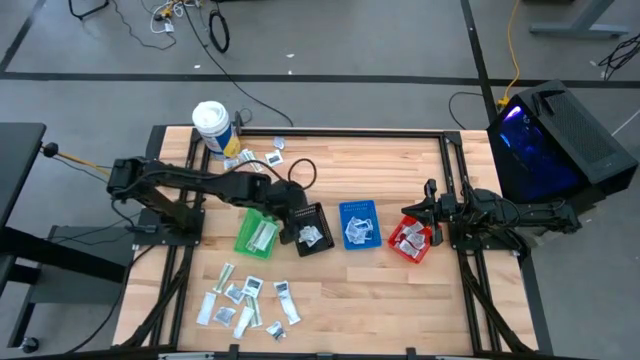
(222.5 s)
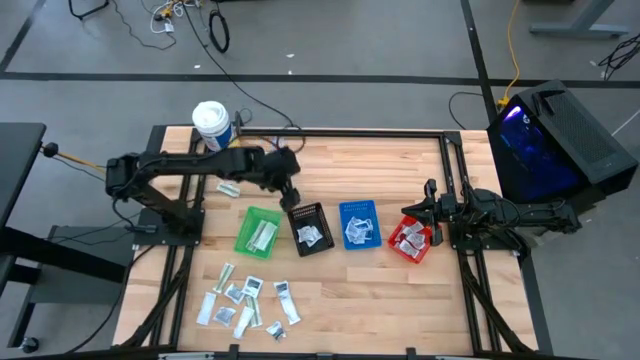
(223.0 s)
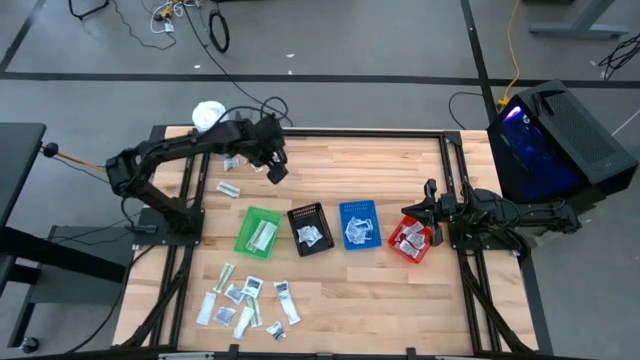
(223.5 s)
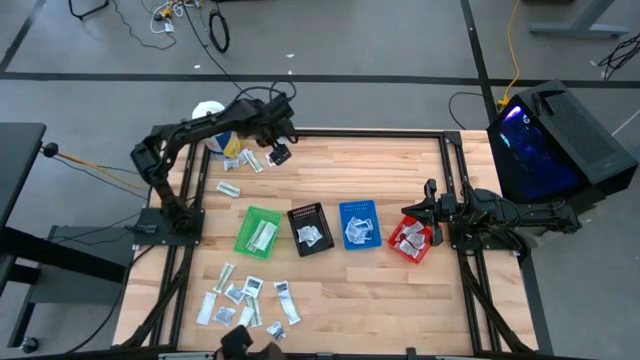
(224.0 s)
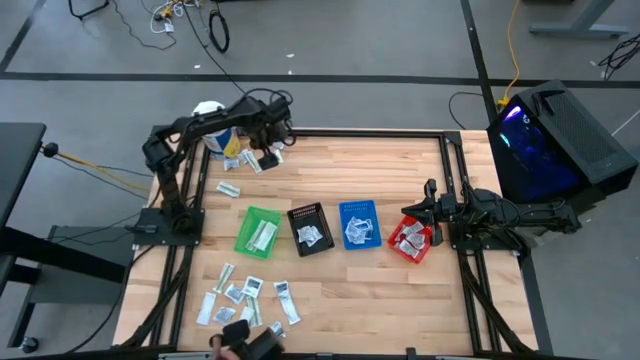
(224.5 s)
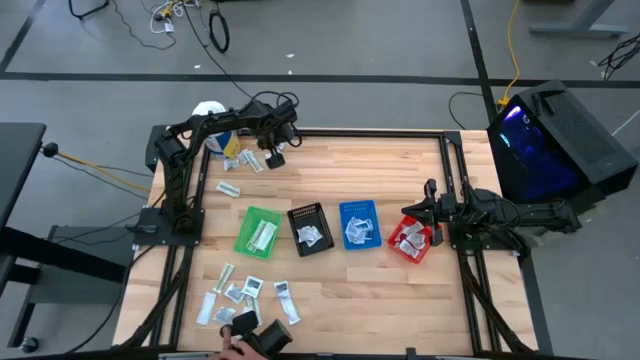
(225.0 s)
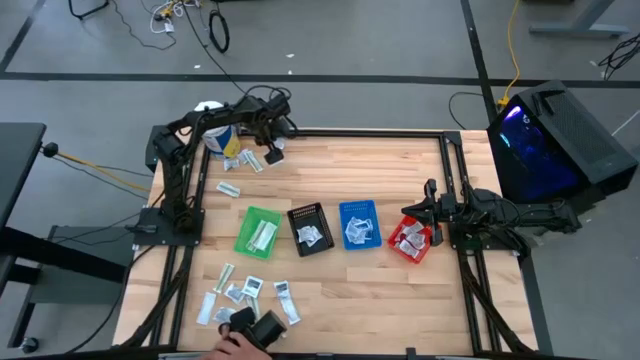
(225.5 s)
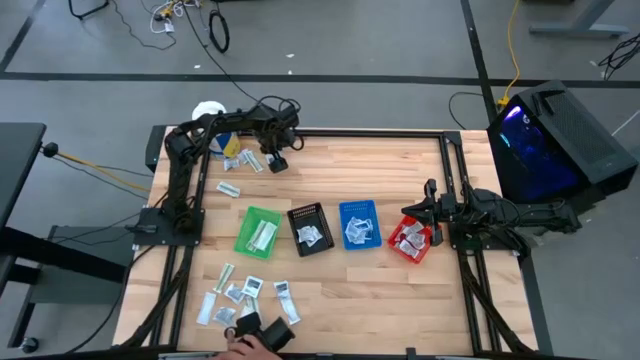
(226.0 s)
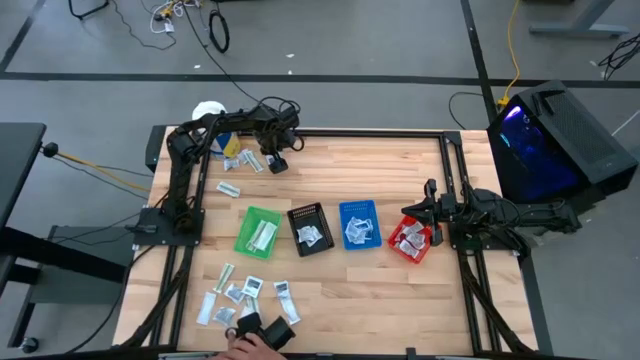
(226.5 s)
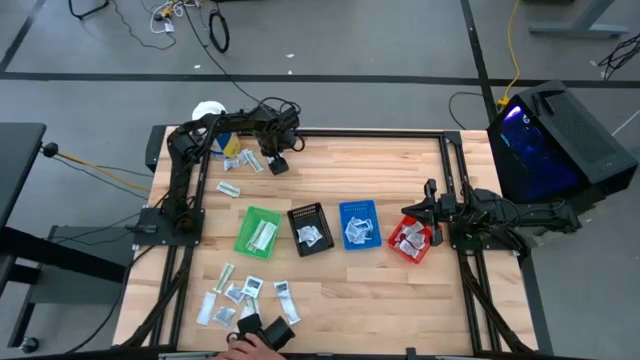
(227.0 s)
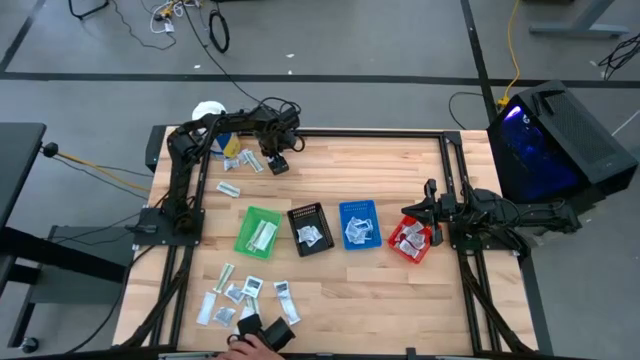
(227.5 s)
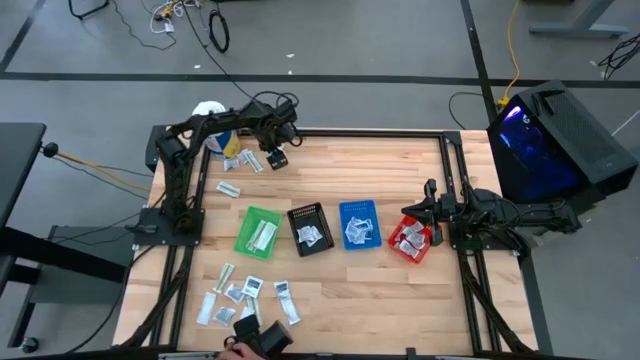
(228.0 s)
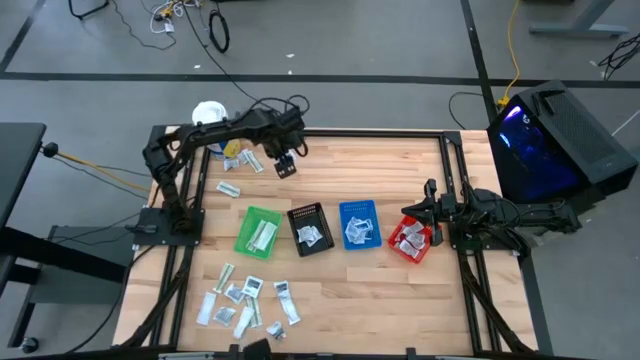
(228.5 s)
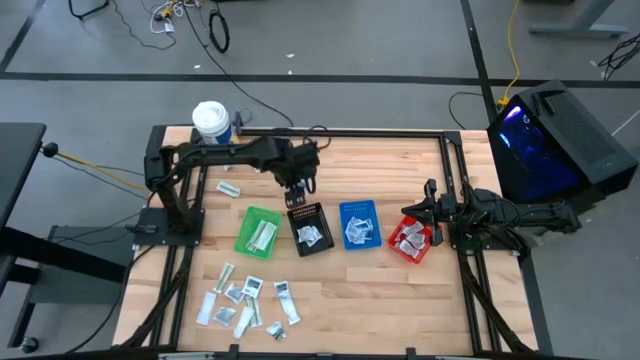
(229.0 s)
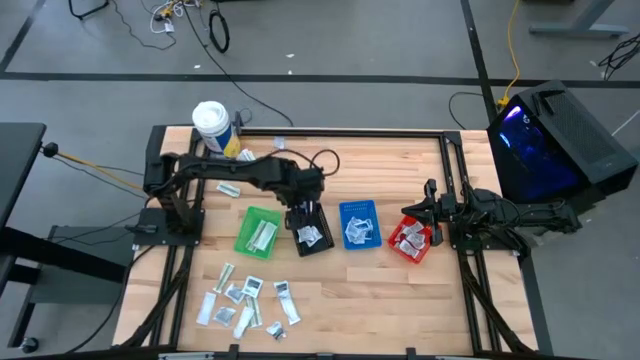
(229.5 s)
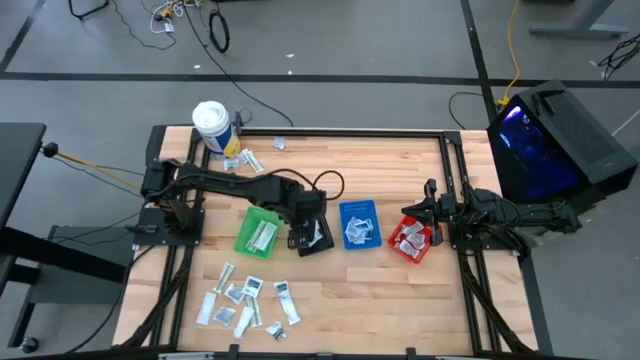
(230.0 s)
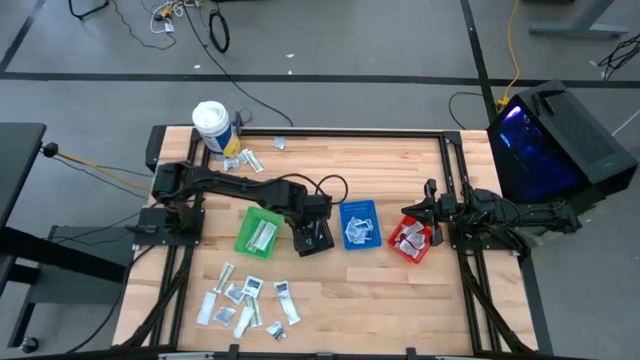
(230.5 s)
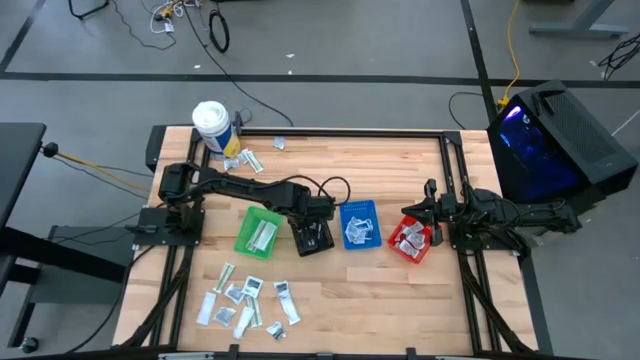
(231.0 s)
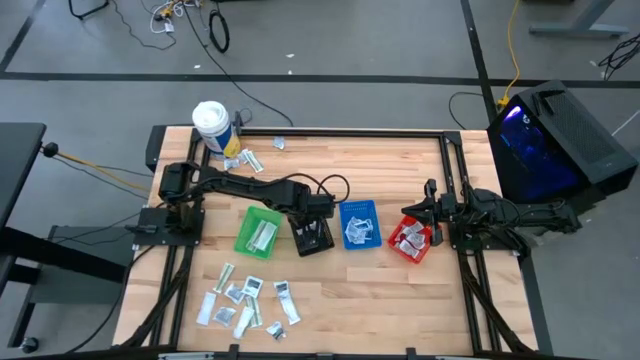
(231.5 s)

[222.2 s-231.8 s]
Task: Pick & Place First Aid Supplies
Put the towelette pack into the black basket

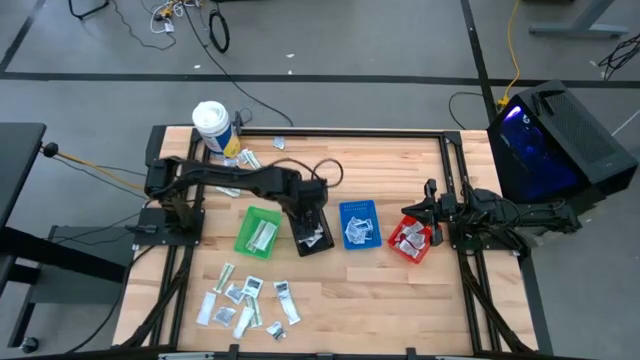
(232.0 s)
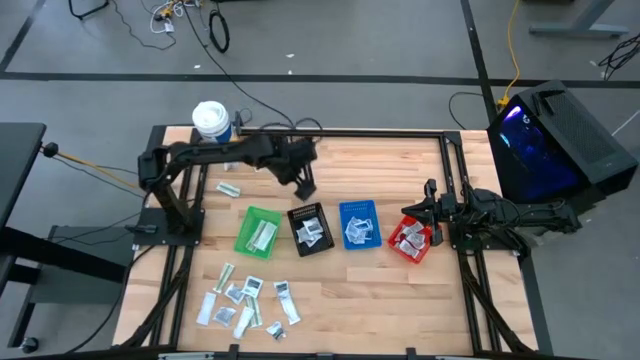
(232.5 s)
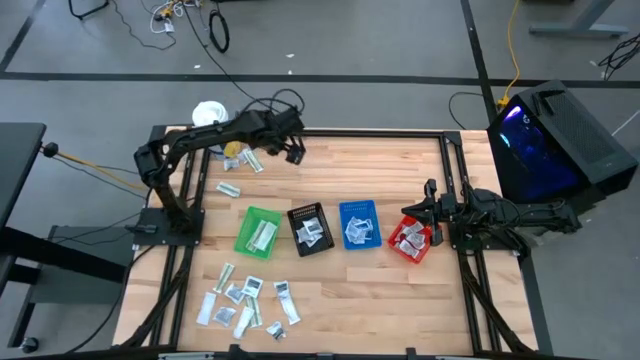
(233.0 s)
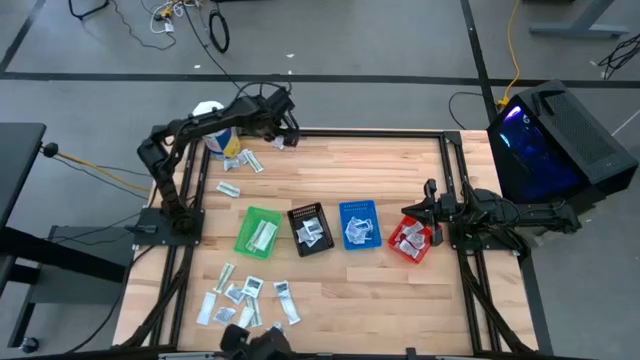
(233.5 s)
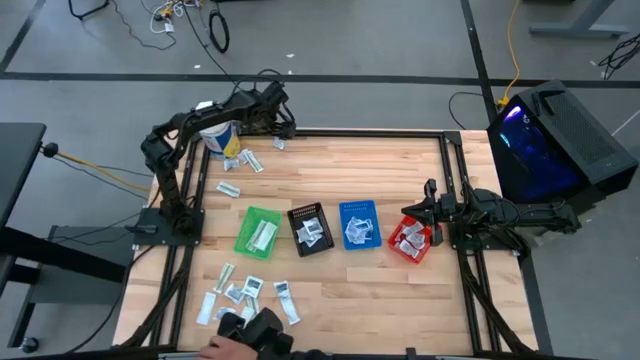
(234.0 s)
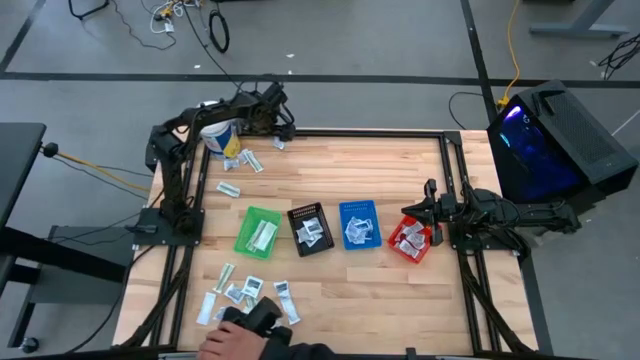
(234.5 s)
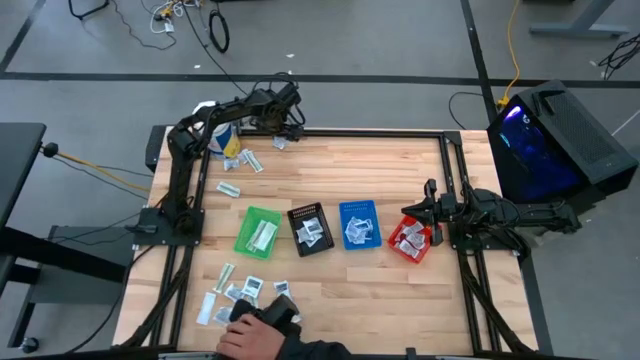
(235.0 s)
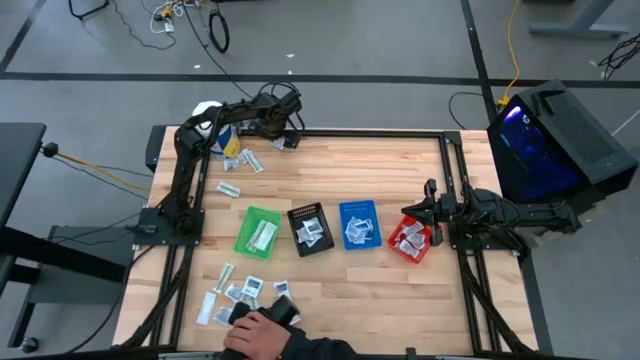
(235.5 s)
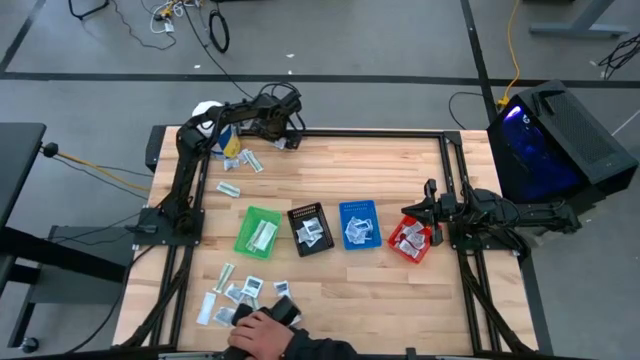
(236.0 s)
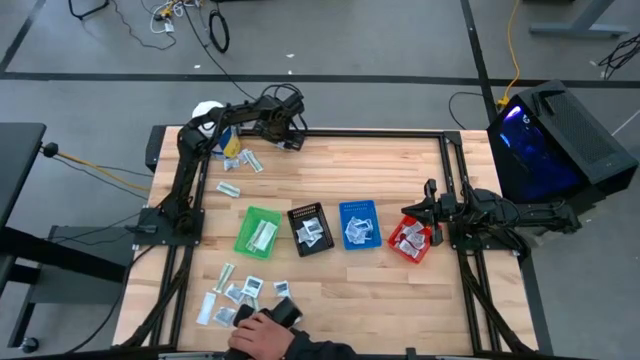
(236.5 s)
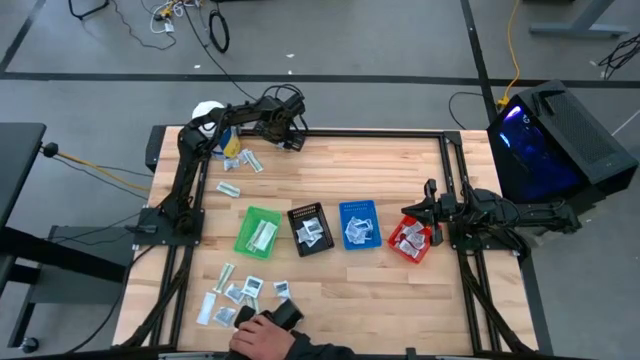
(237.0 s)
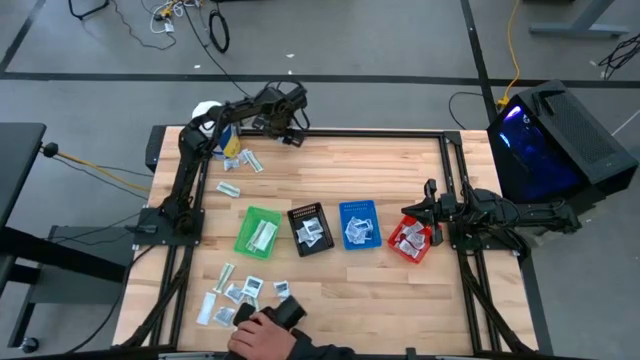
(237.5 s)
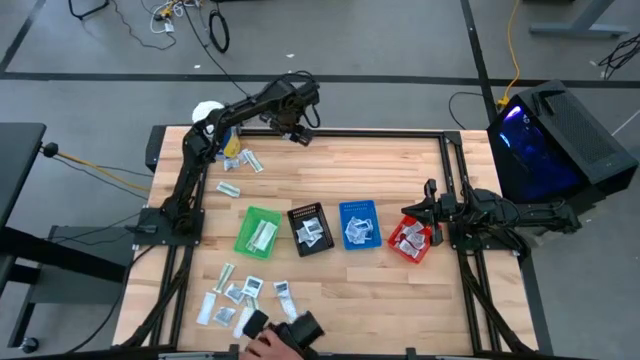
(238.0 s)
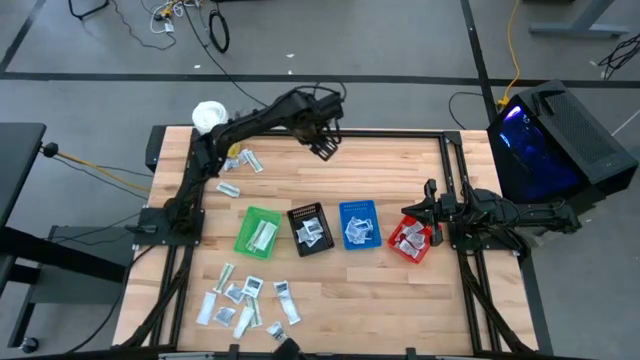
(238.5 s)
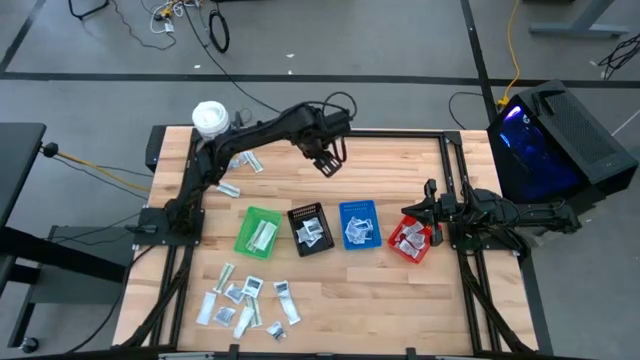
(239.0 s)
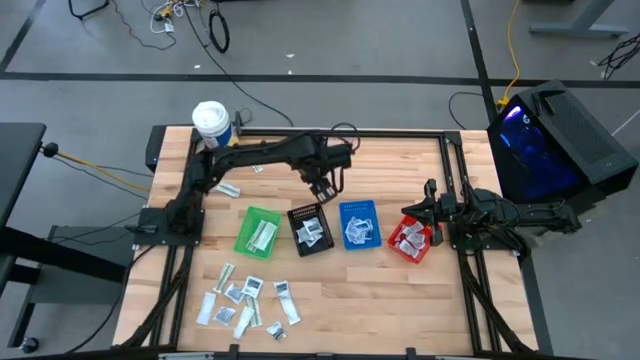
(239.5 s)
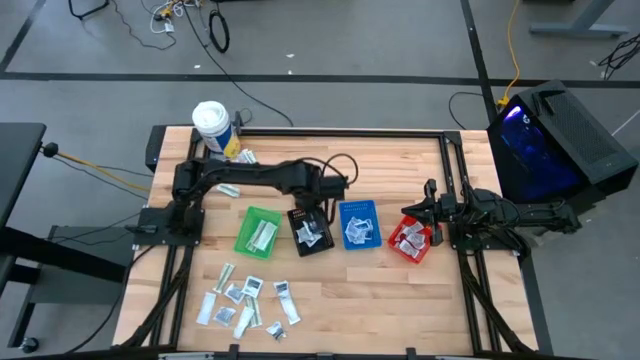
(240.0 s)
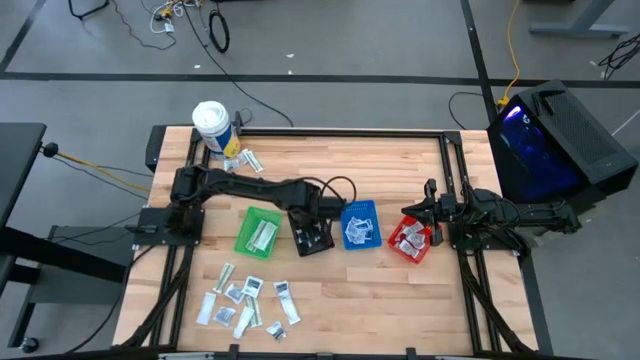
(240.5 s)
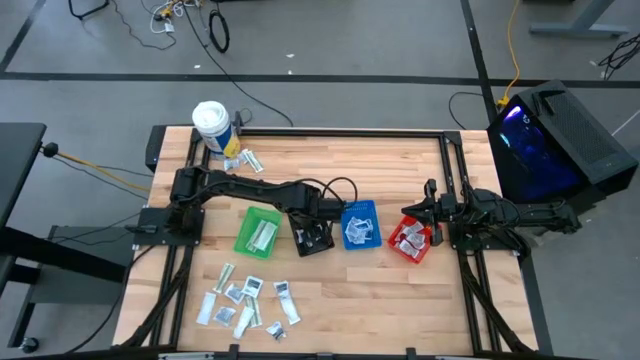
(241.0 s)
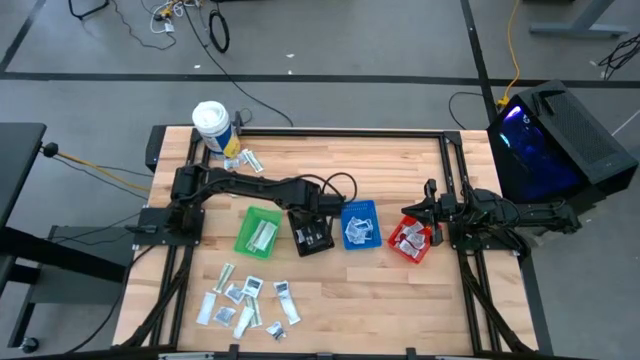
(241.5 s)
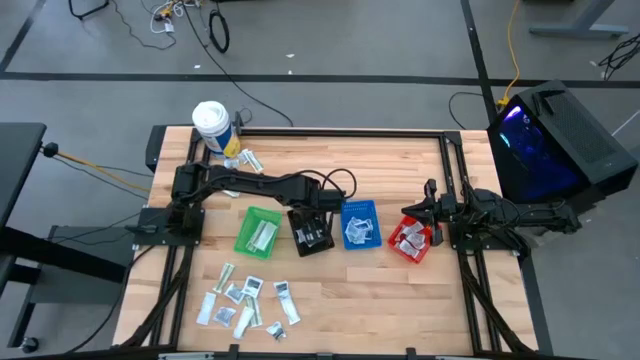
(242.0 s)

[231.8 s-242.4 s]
Put the towelette pack into the black basket
